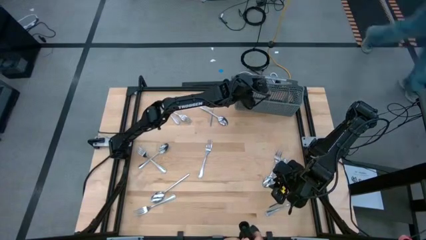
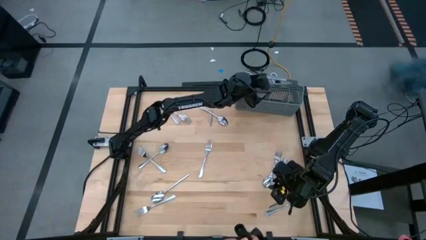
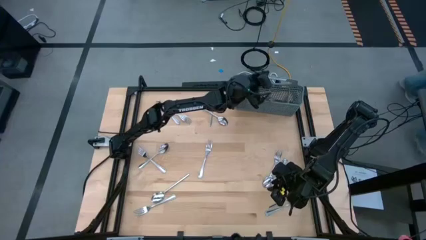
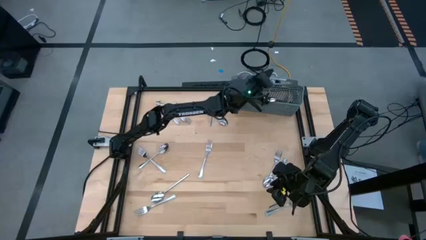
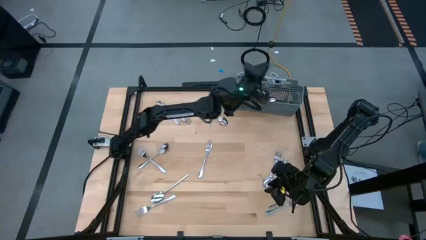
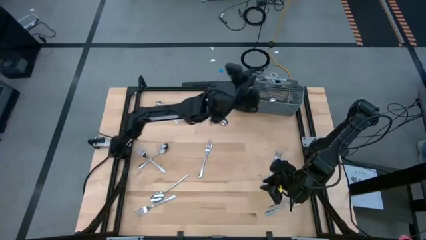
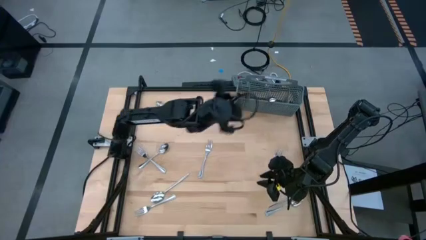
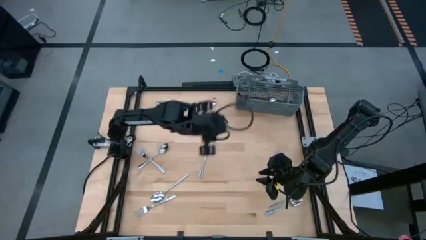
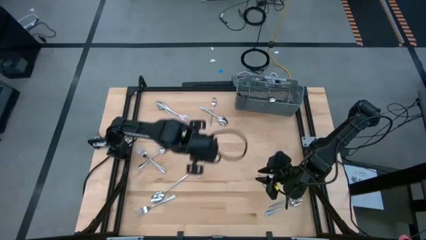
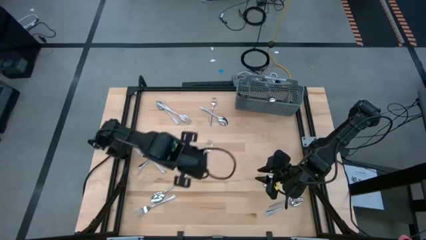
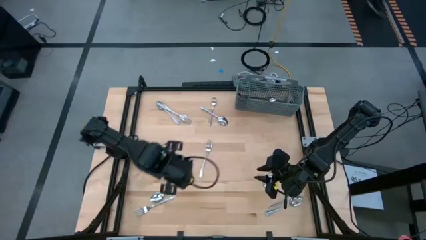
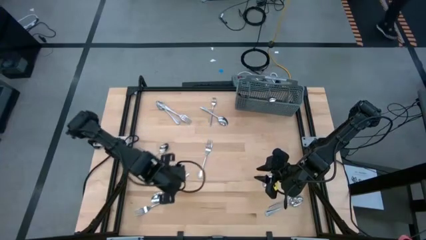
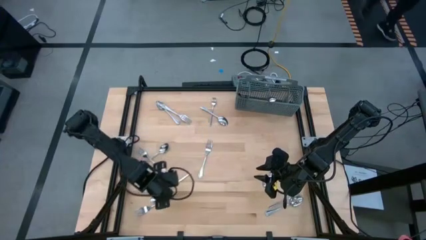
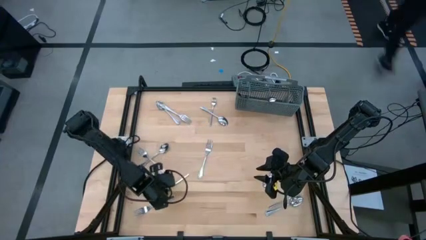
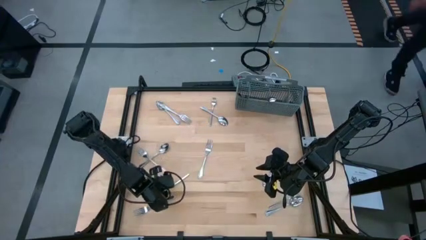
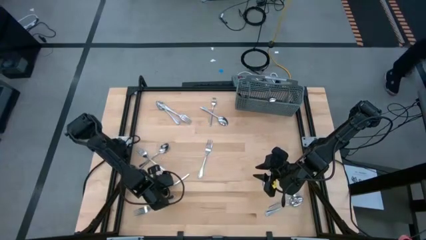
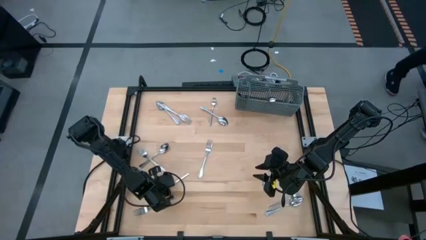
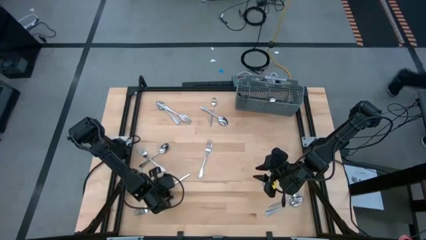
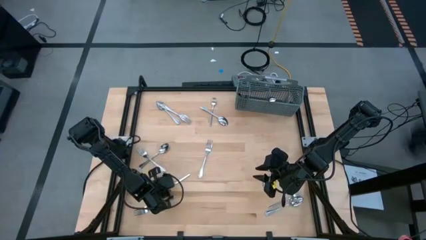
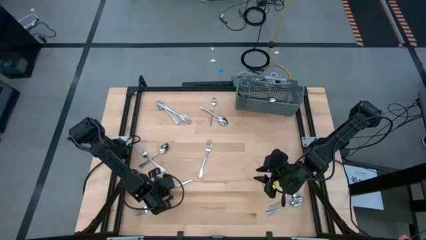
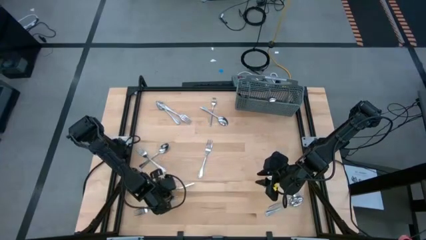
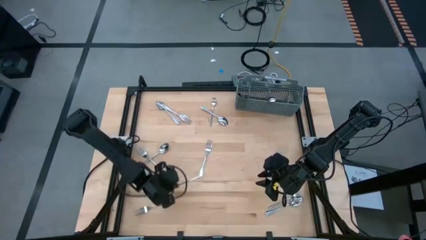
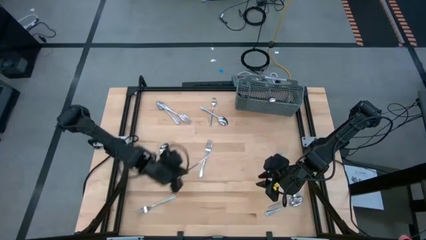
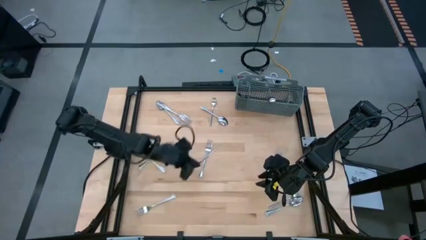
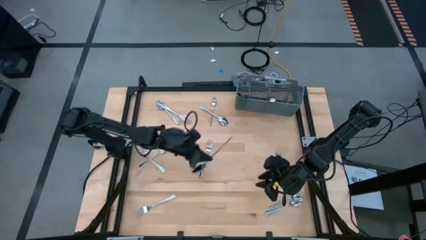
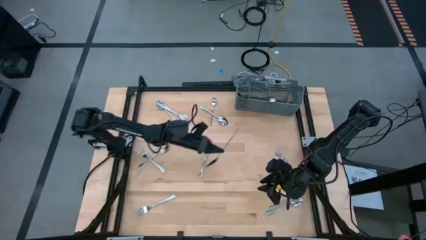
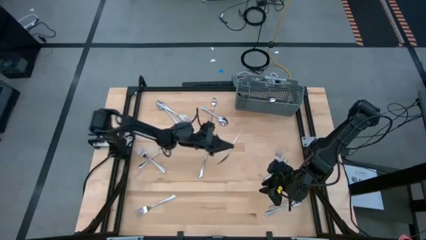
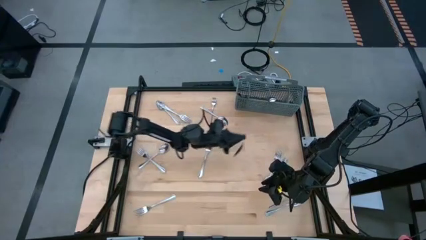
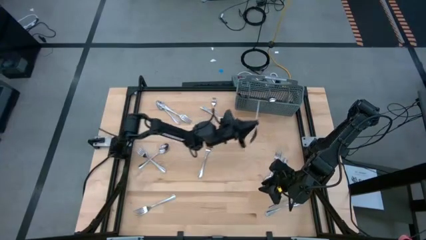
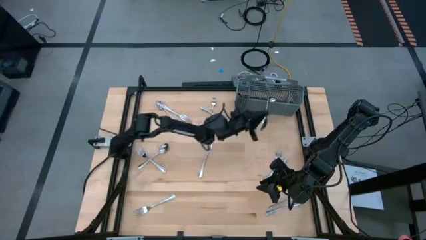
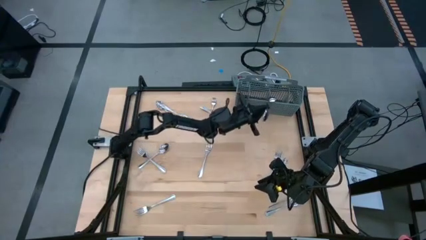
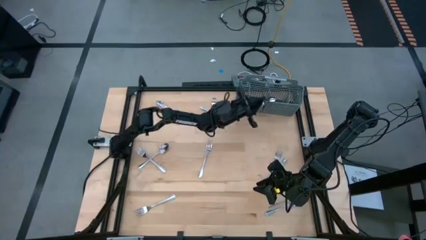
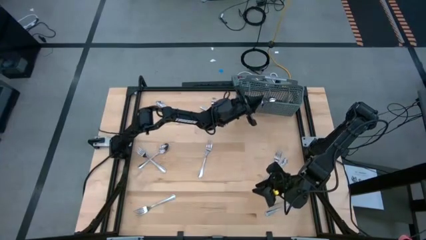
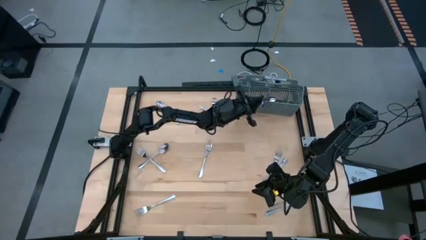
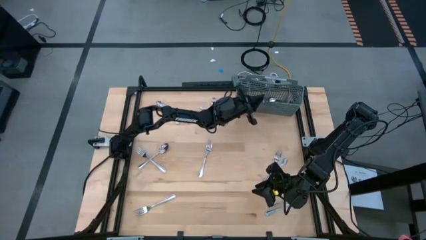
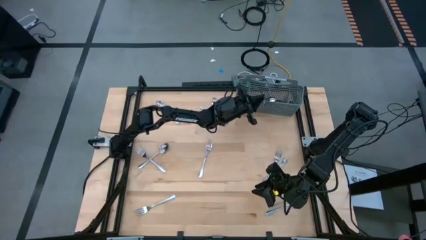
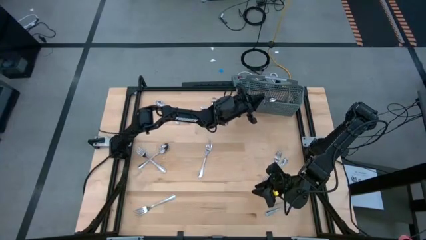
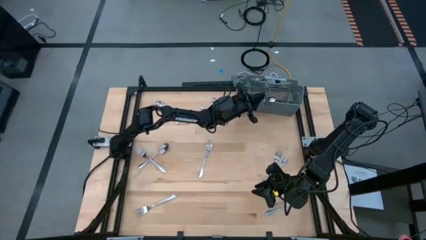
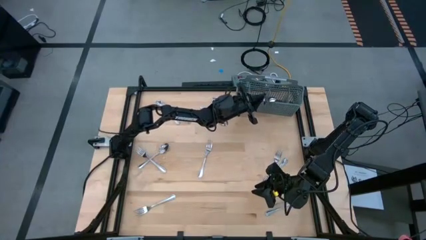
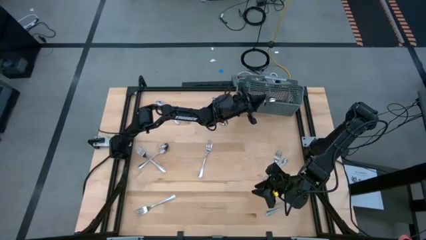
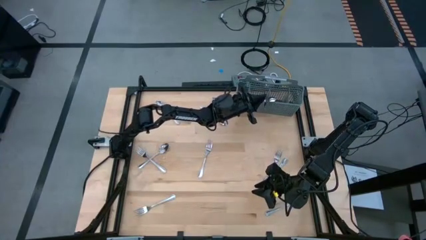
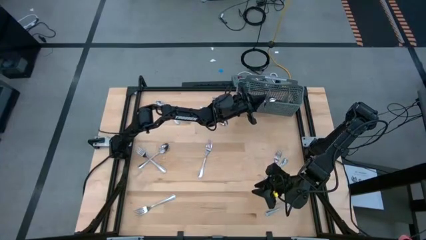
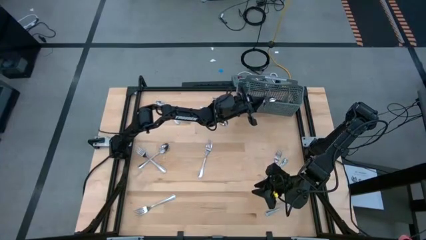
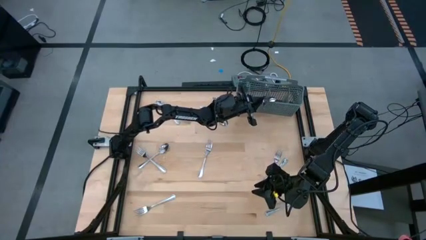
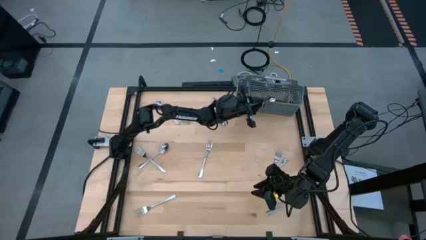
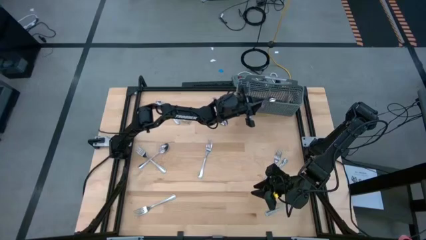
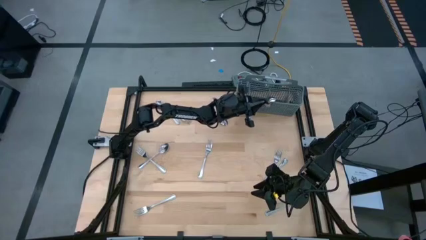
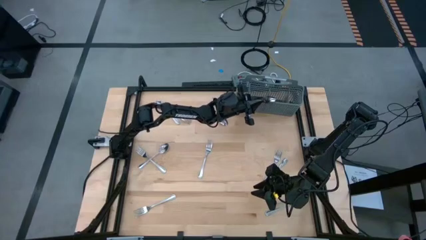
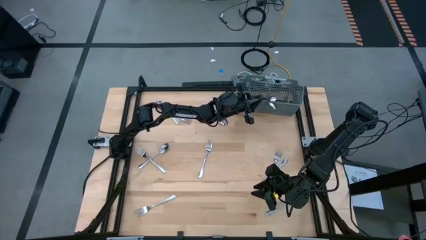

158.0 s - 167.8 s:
Task: Sort silverware
Put the silver spoon into the silverware basket

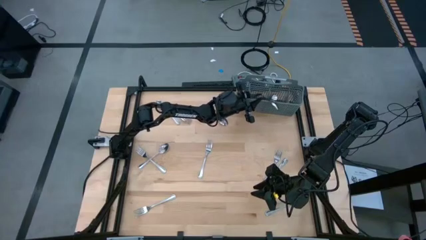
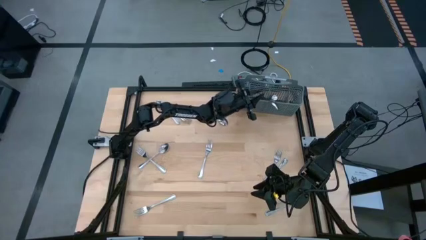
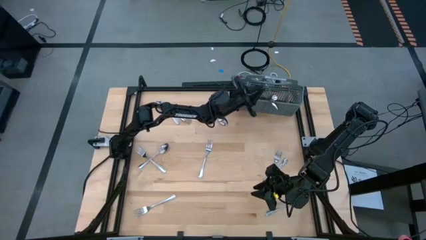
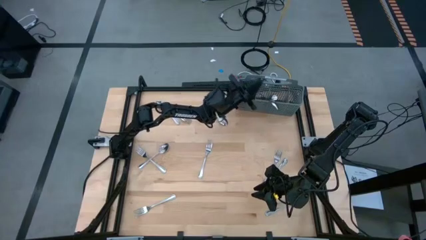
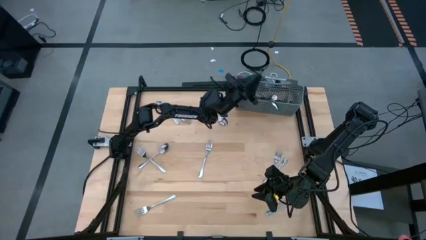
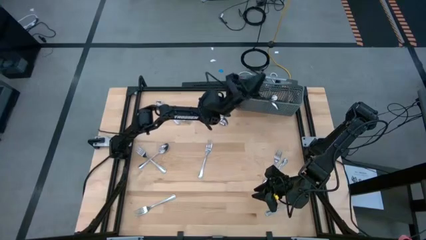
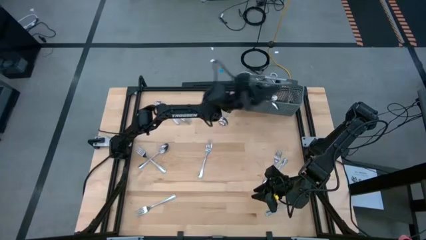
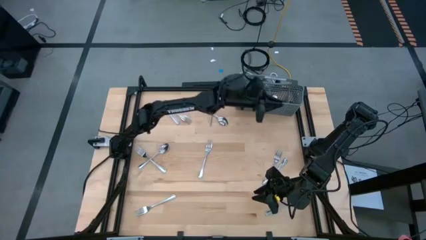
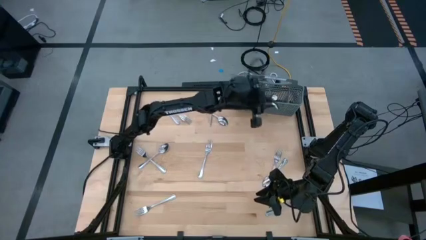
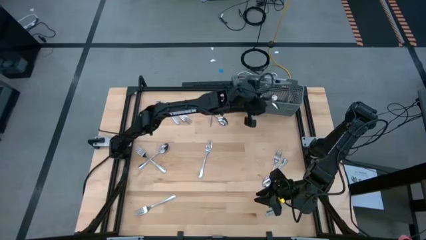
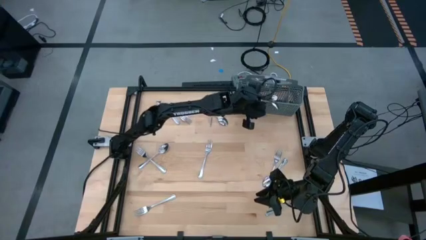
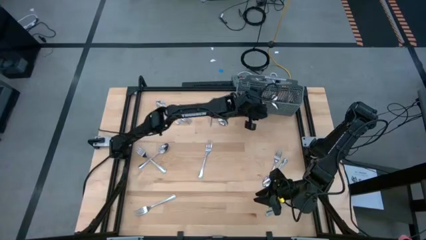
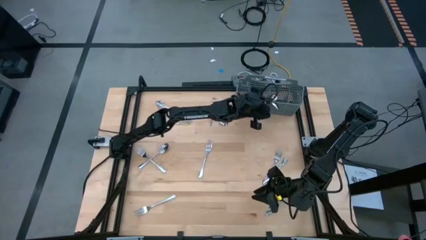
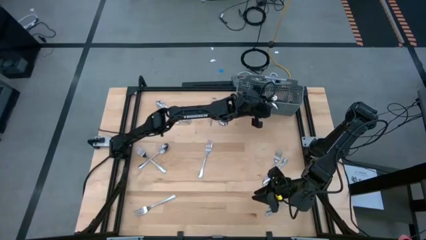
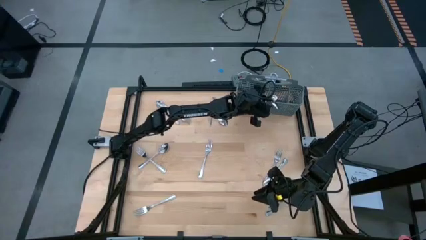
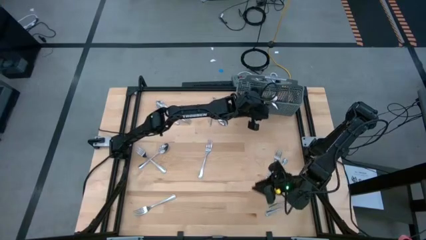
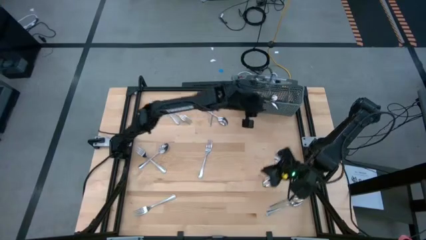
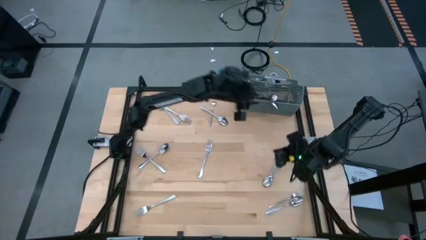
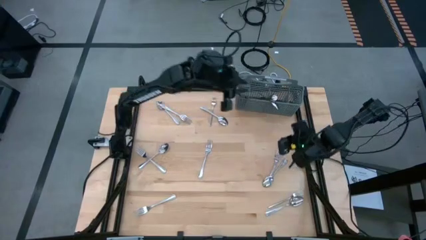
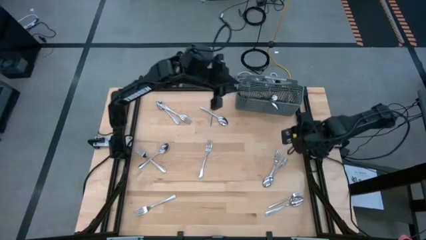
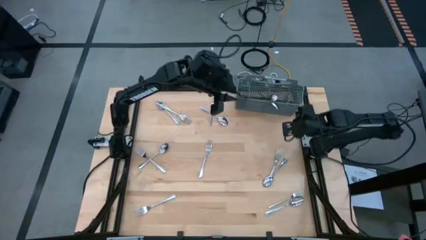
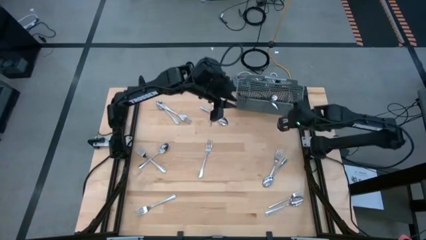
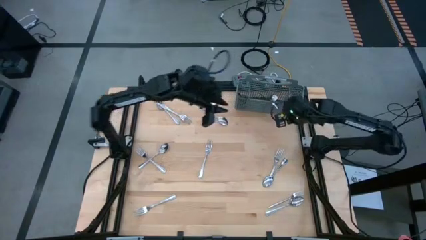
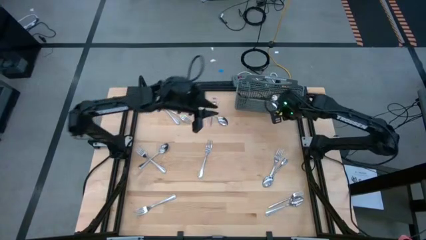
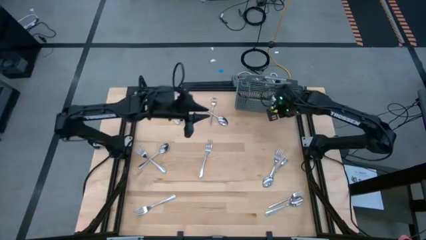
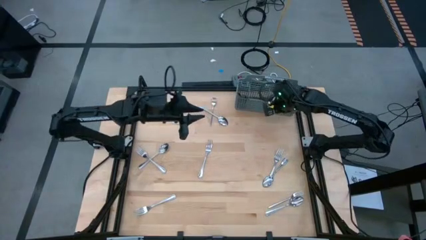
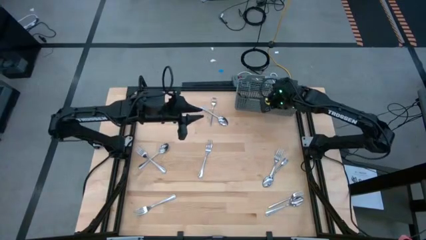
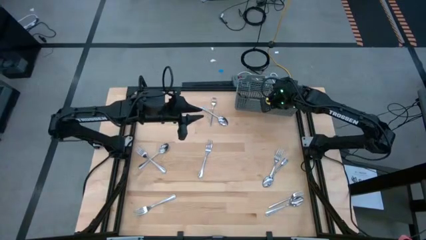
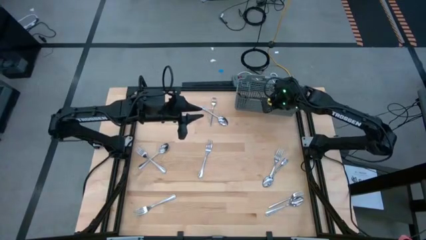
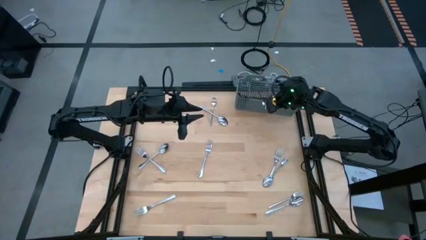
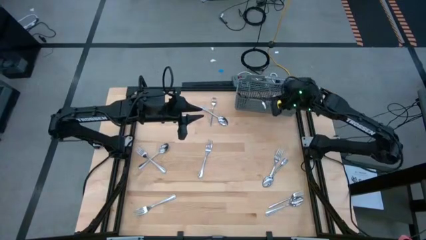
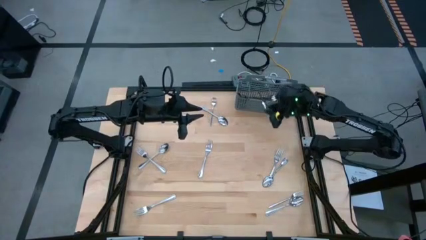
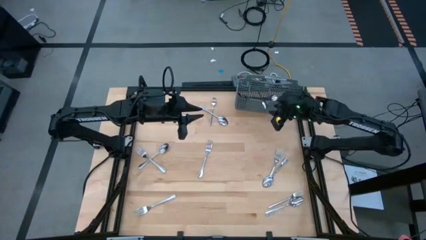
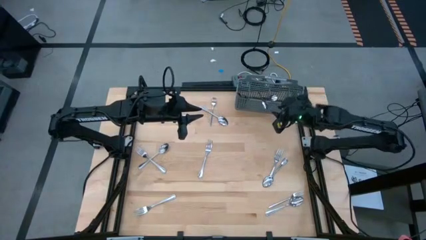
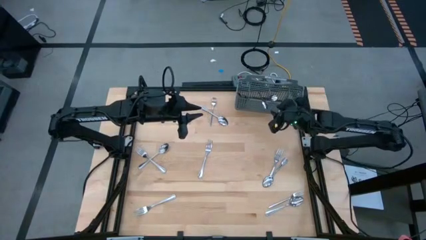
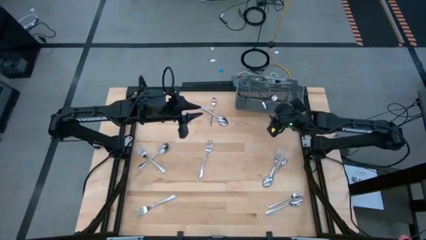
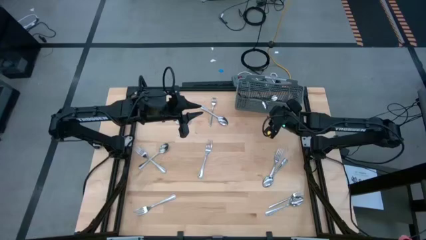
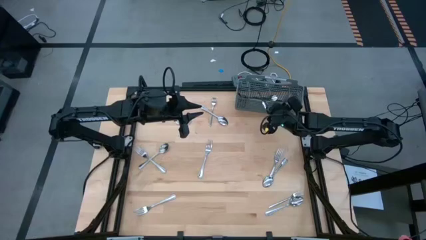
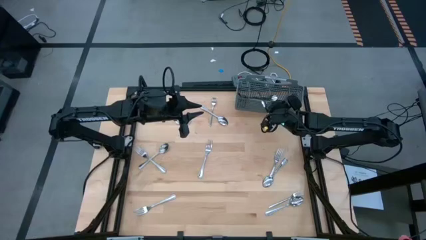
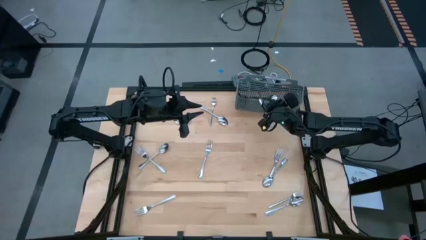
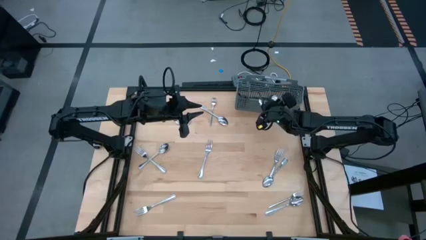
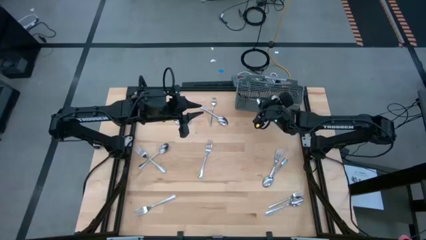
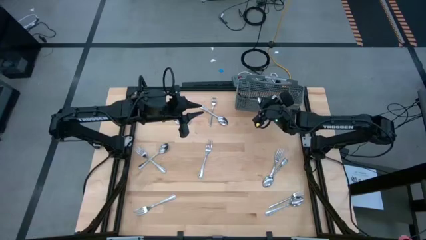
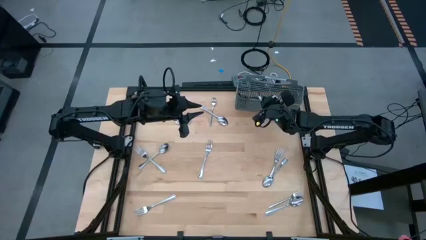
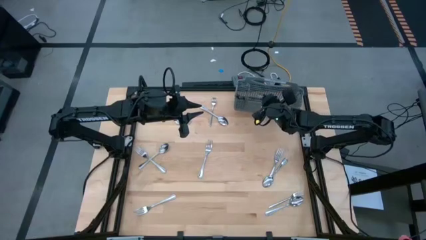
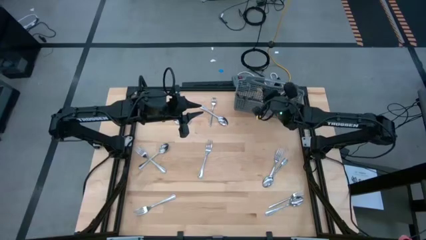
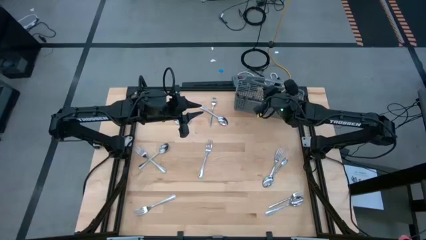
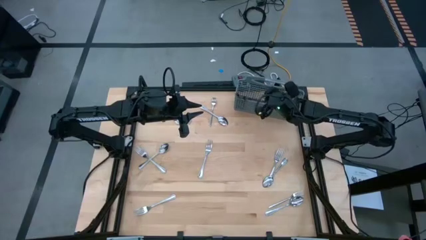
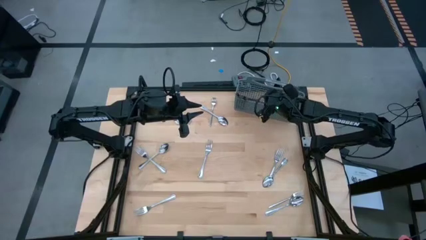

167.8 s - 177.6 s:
Put the silver spoon into the silverware basket
